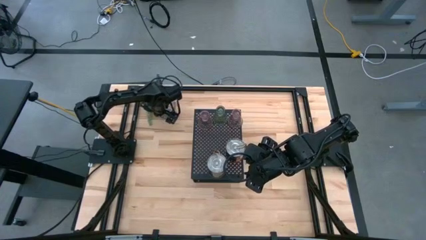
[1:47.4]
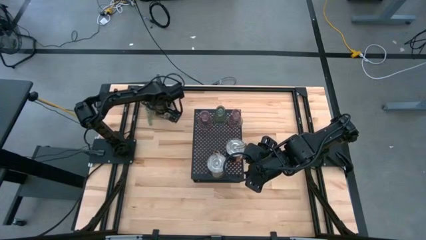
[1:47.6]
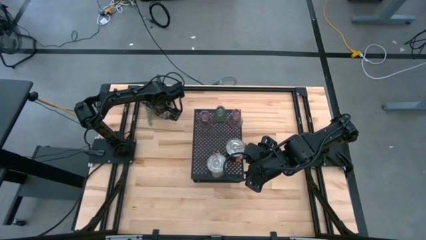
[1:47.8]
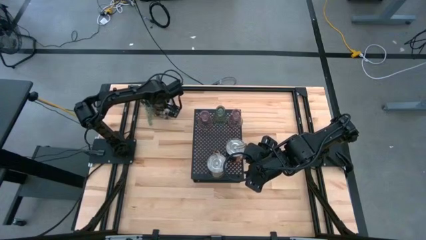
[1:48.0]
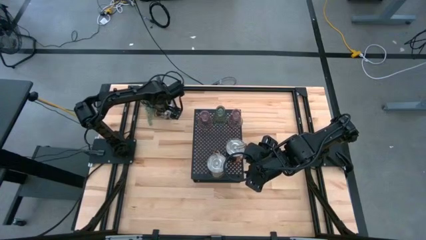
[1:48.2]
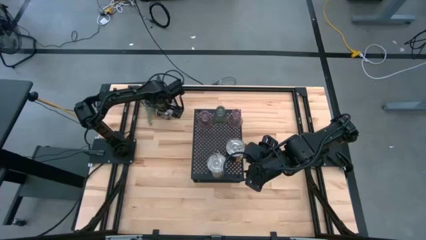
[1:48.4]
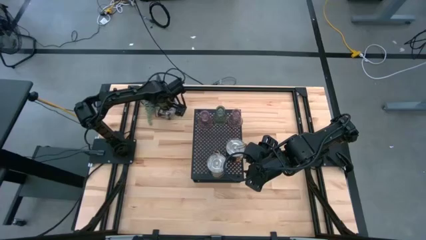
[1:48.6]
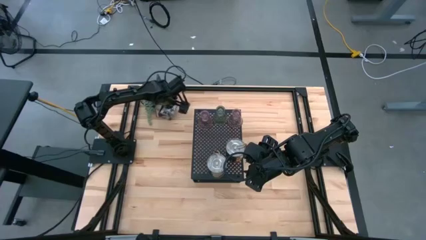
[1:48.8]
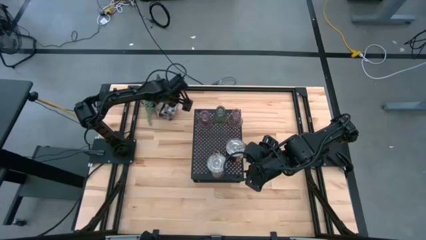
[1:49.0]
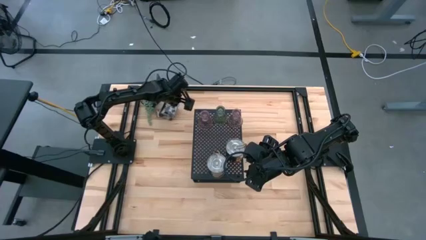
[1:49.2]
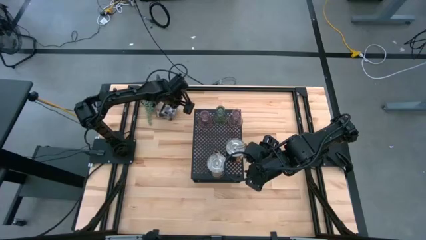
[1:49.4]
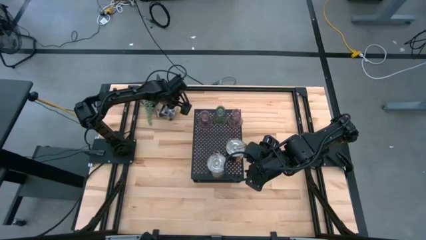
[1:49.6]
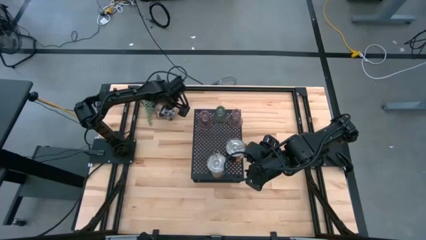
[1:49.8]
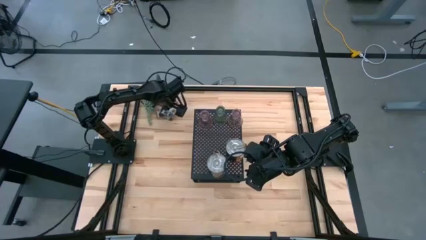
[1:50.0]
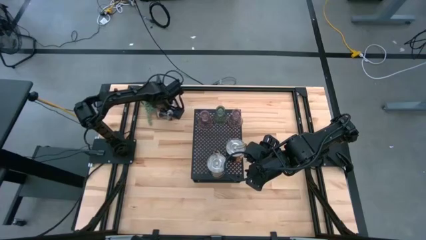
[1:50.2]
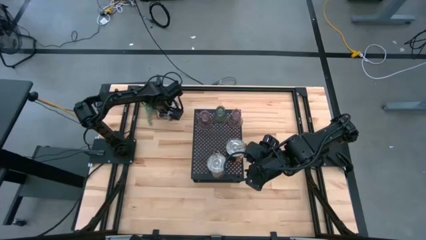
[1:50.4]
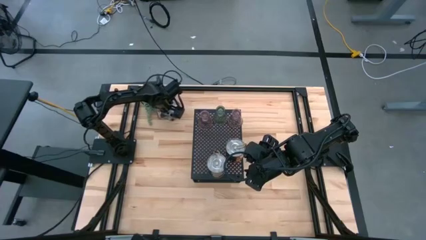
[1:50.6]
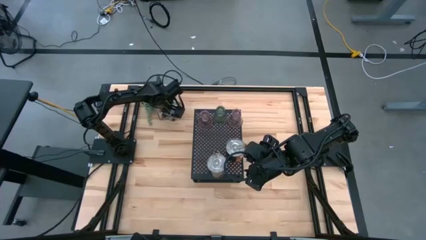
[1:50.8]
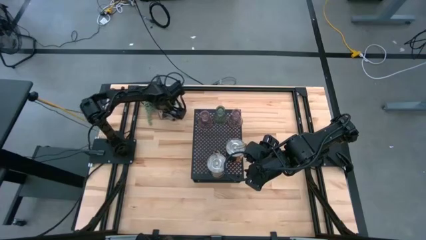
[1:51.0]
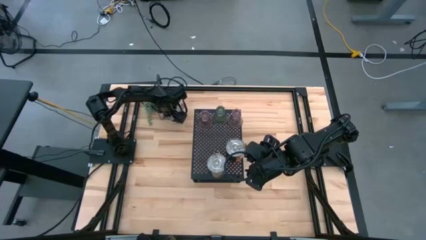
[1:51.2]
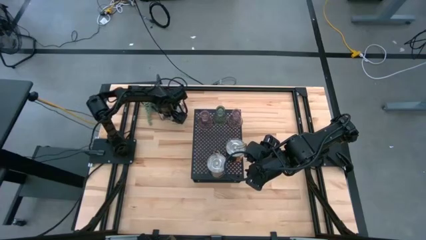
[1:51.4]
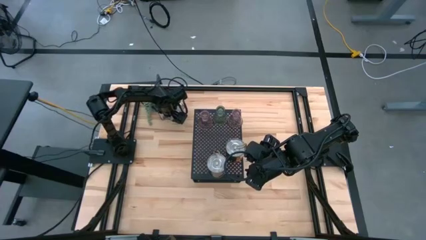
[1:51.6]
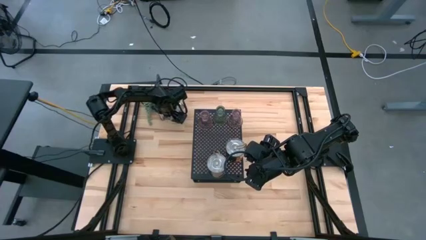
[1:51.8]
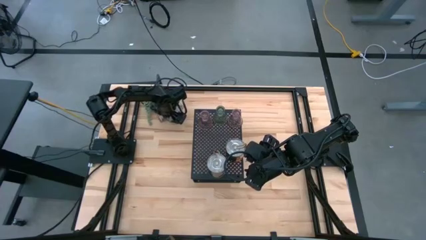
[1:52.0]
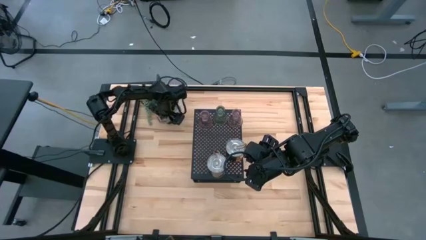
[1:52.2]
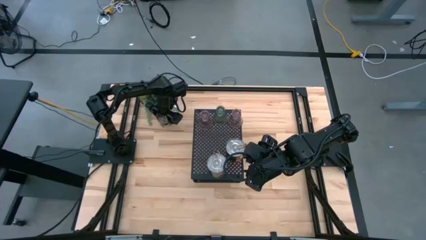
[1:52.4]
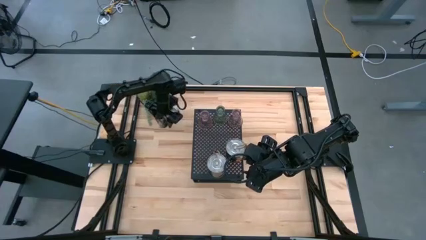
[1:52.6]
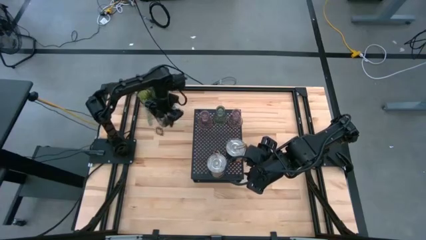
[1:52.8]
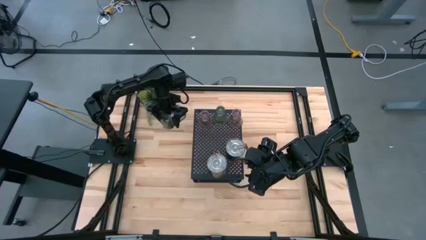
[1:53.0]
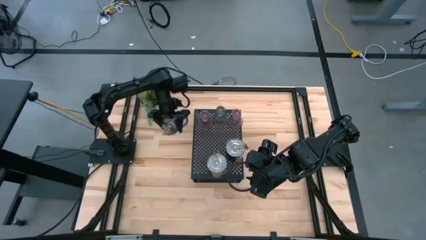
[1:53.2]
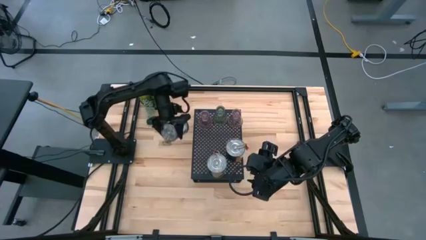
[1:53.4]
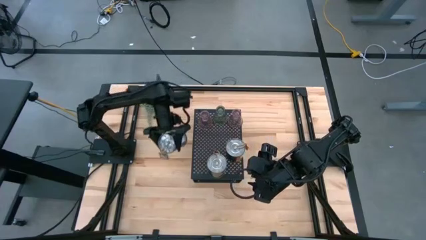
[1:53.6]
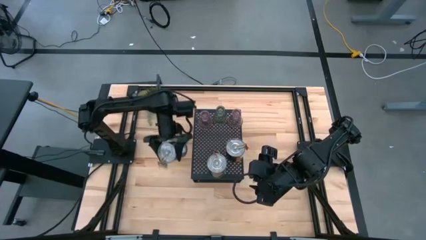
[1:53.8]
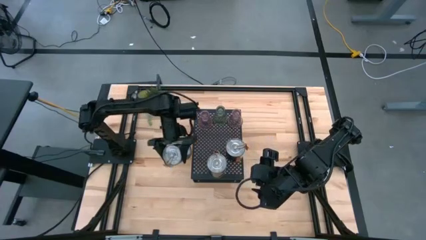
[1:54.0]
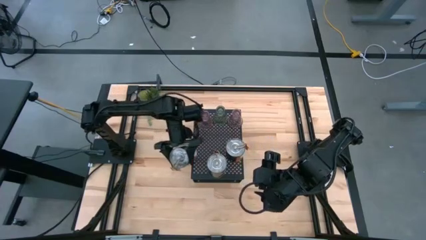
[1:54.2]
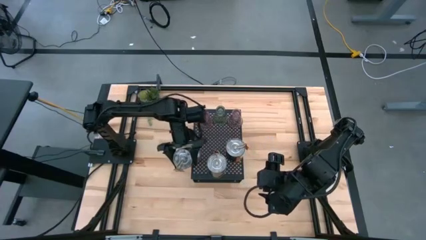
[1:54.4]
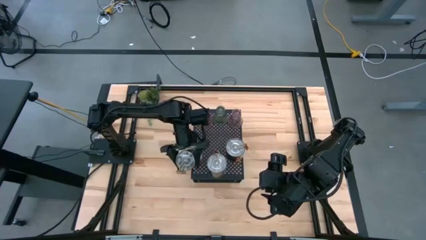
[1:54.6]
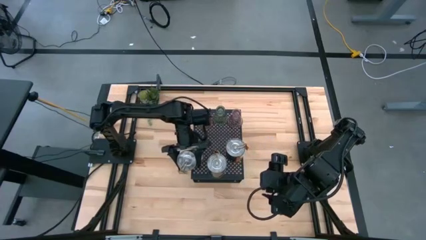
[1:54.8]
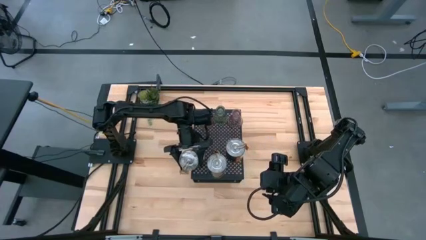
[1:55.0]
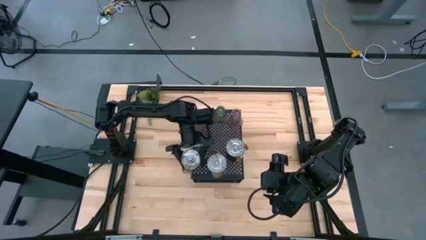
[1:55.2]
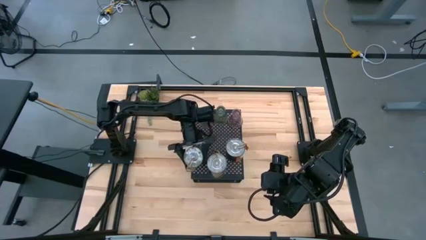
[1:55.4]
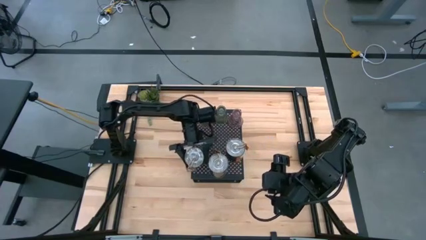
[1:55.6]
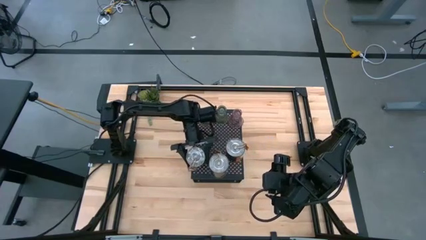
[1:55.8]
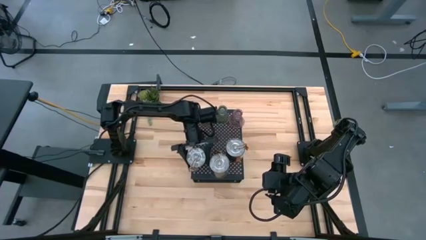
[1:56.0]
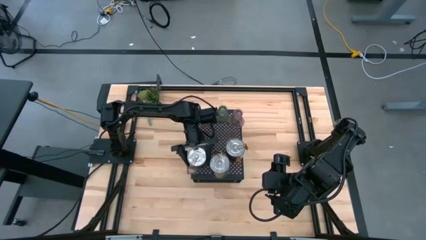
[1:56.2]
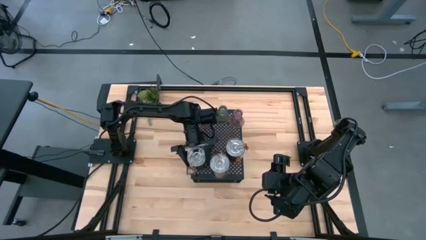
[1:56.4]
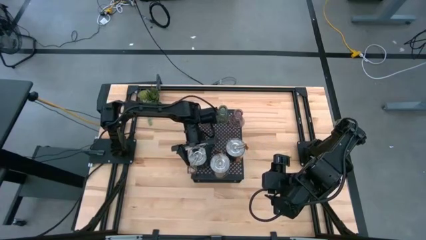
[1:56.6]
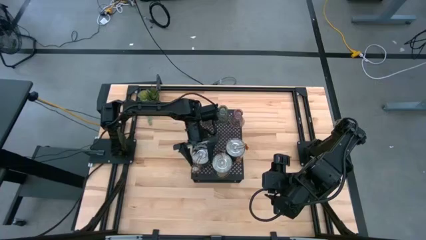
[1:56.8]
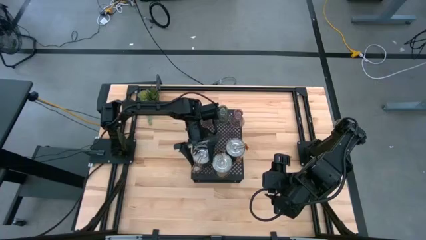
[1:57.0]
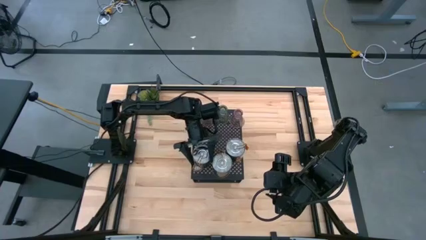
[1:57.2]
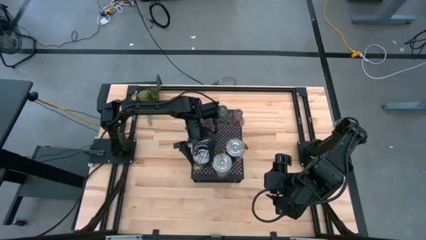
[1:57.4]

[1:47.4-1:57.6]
Task: Pick & Place candle stick holders
Put the brown scented candle on the shelf

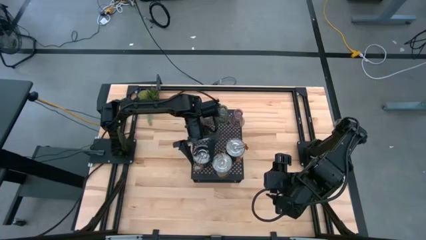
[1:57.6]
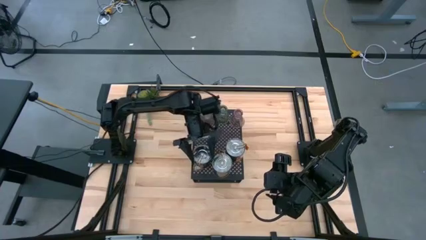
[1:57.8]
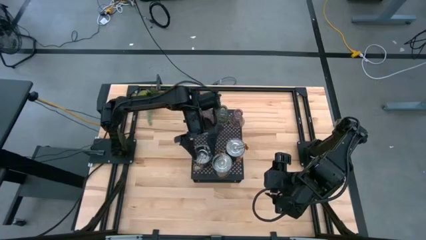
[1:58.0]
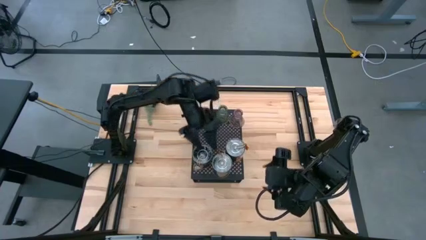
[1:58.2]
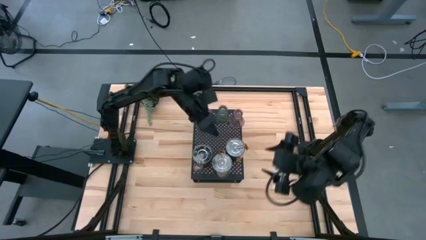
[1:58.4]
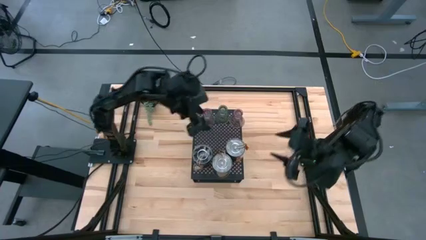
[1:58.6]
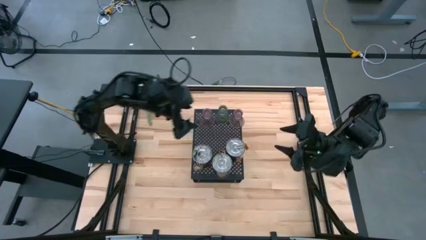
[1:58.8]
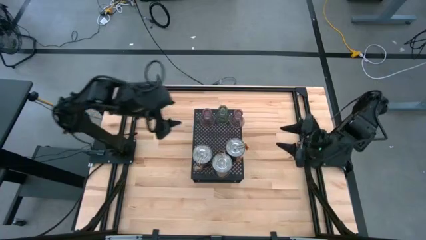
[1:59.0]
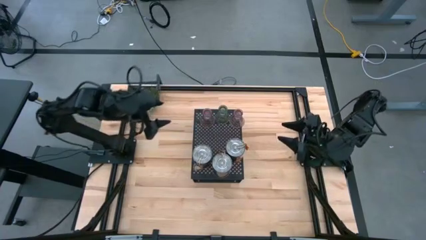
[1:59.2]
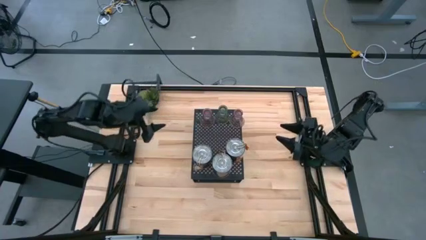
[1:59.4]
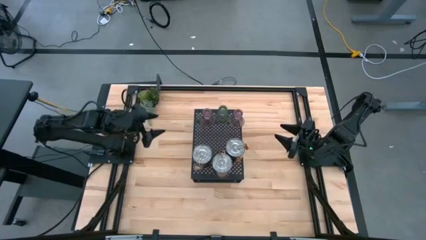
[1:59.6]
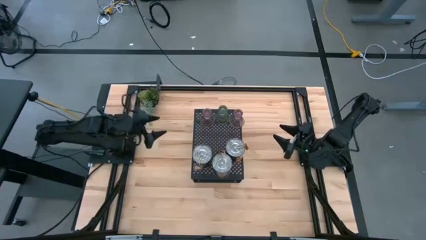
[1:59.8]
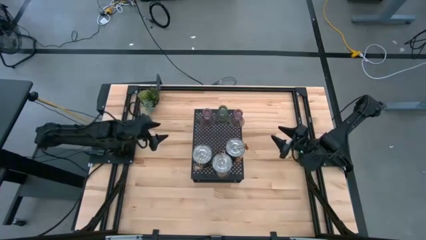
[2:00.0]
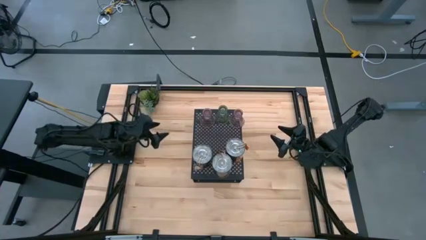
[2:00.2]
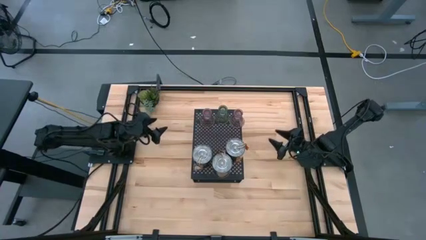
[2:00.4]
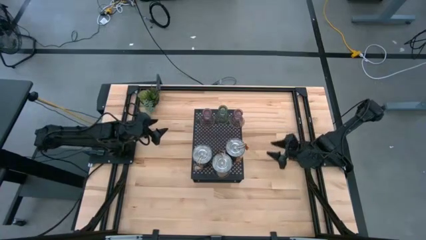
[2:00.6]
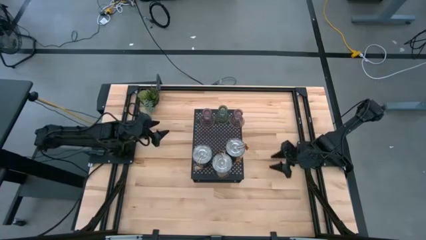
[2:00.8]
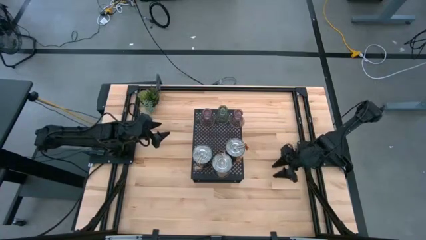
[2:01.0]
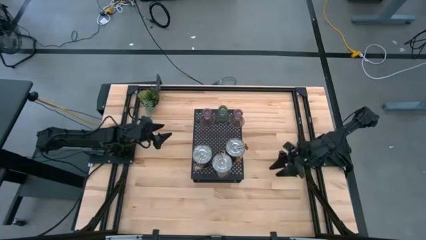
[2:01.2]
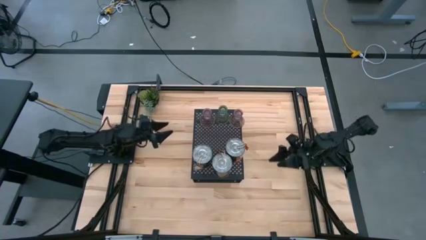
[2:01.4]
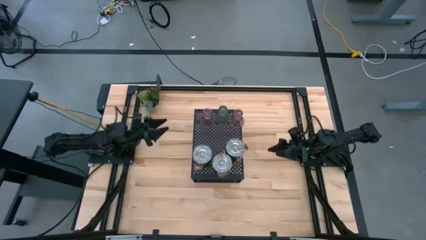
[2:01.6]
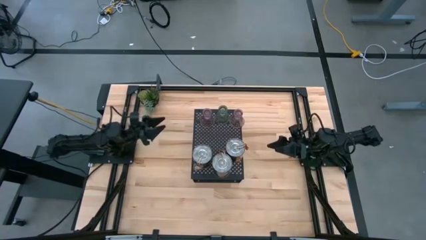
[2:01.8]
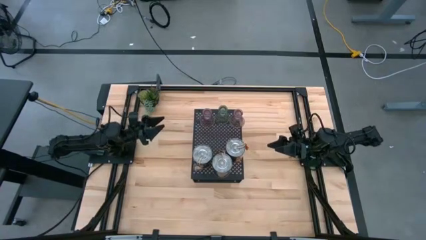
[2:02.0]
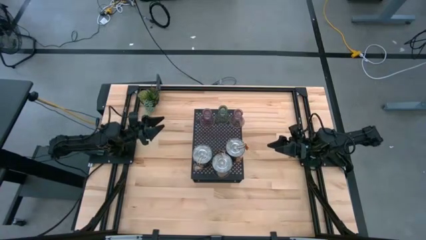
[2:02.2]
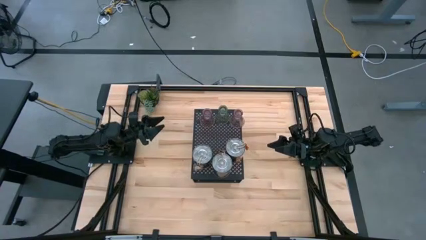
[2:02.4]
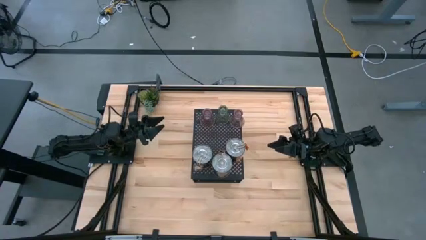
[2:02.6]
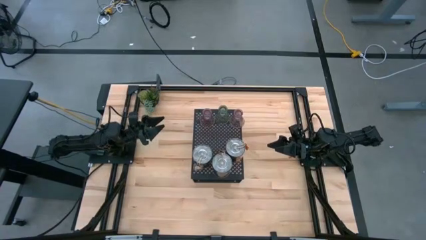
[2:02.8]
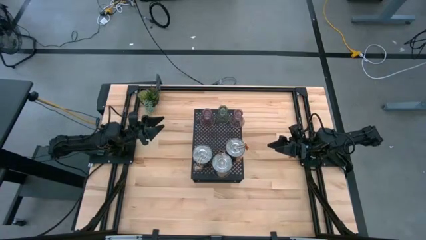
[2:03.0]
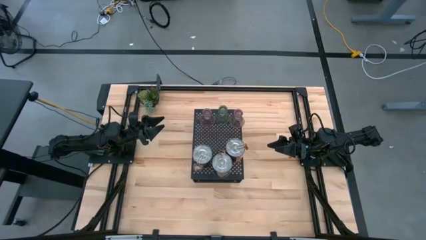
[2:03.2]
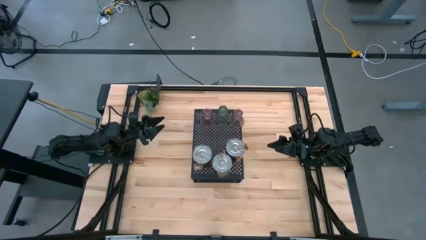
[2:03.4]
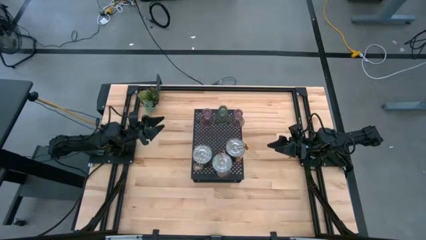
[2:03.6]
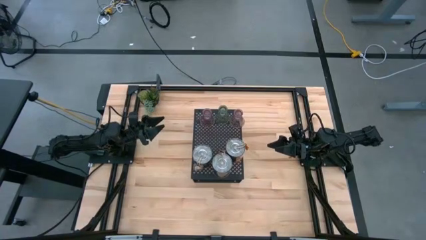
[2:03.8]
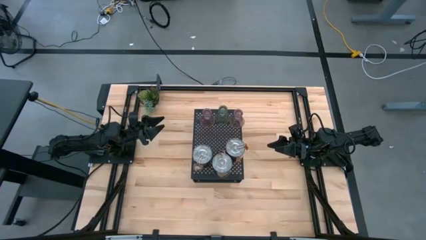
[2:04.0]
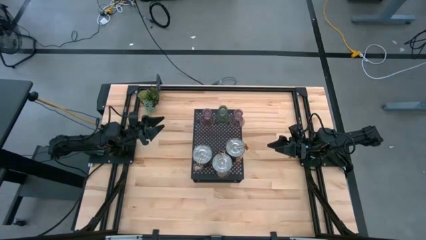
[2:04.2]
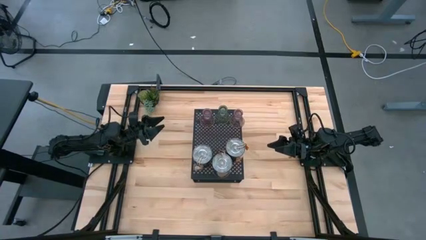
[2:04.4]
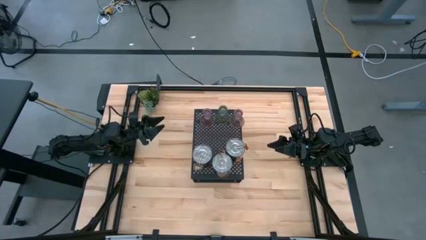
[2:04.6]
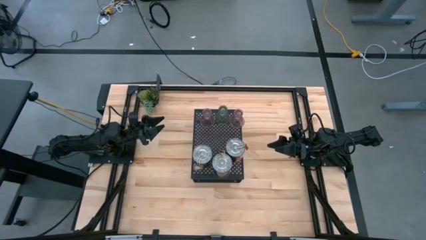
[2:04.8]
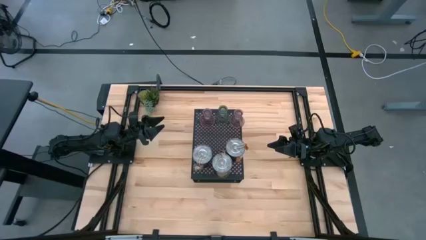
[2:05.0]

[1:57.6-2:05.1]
Return to Home Position
